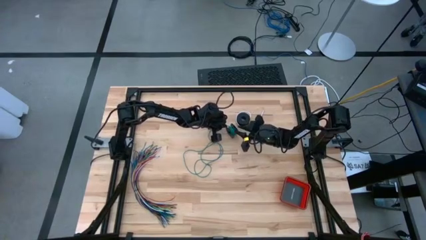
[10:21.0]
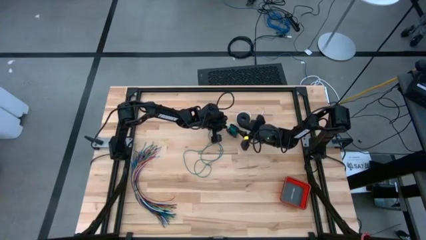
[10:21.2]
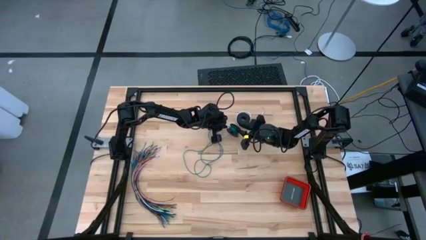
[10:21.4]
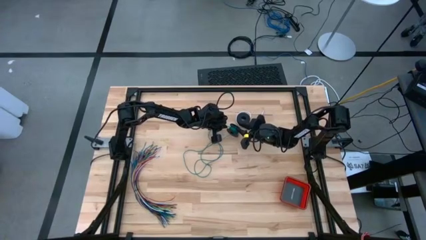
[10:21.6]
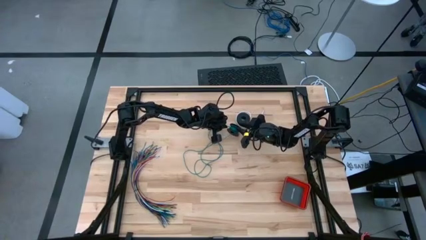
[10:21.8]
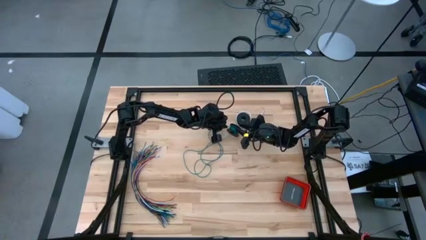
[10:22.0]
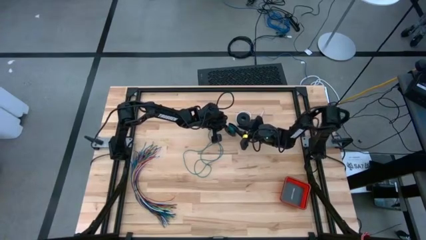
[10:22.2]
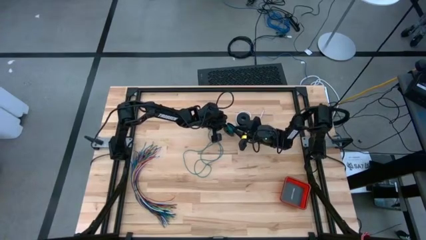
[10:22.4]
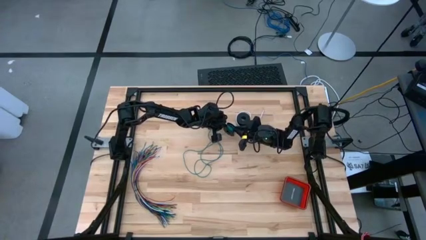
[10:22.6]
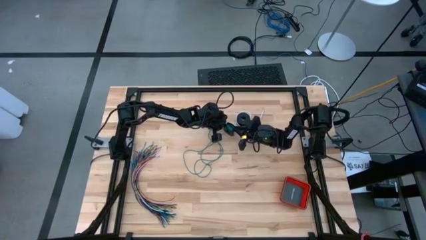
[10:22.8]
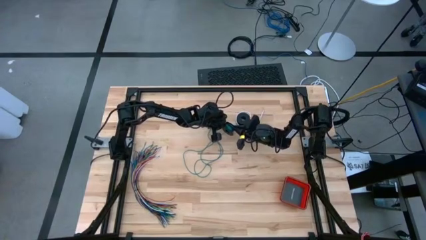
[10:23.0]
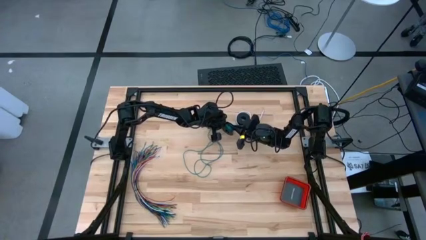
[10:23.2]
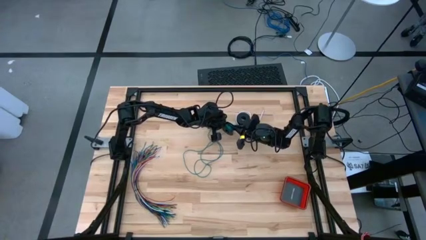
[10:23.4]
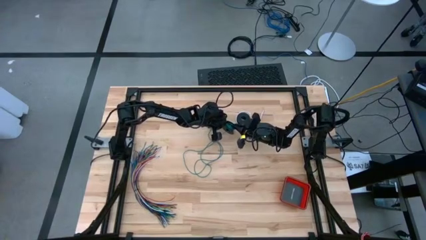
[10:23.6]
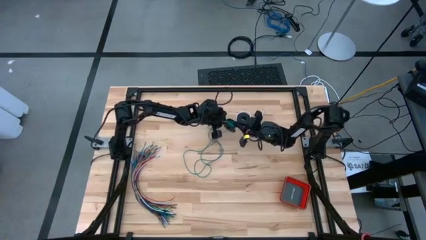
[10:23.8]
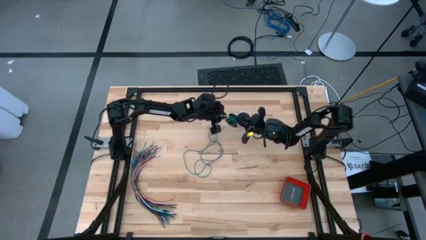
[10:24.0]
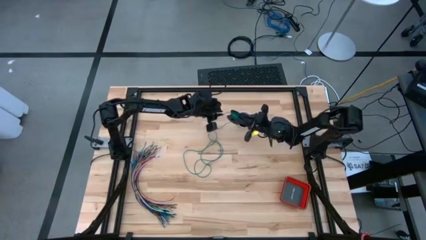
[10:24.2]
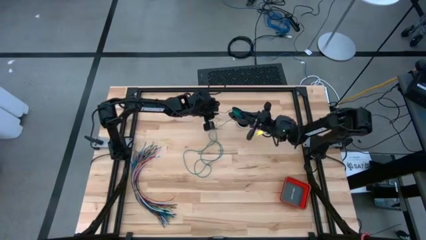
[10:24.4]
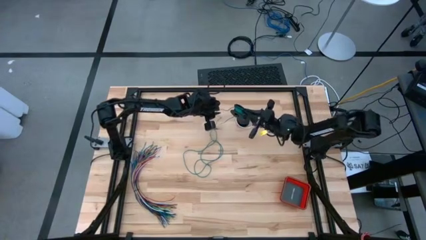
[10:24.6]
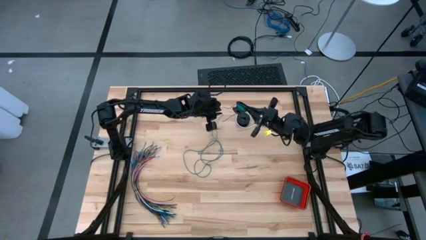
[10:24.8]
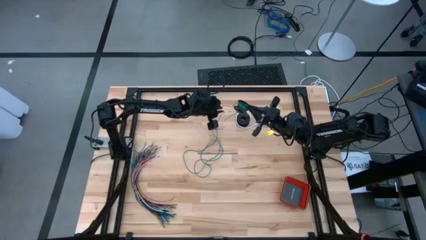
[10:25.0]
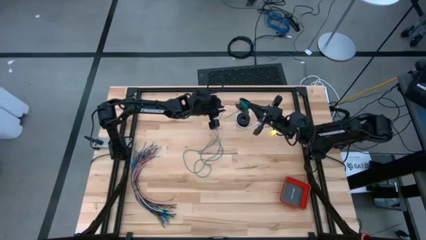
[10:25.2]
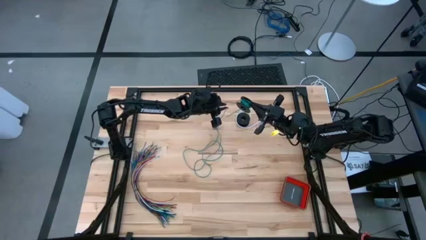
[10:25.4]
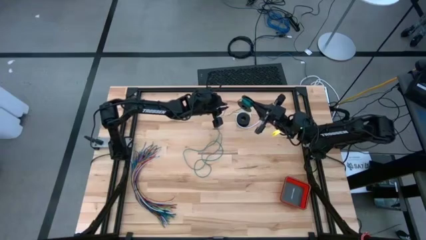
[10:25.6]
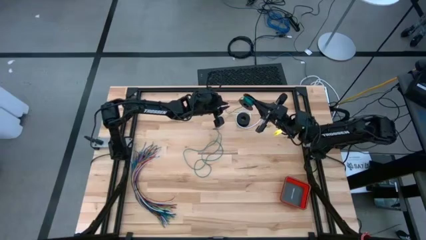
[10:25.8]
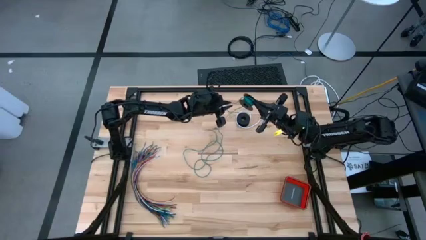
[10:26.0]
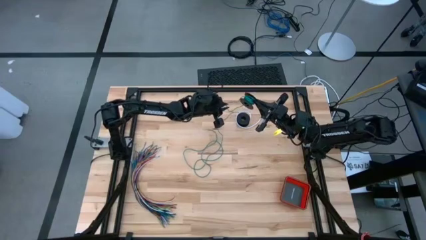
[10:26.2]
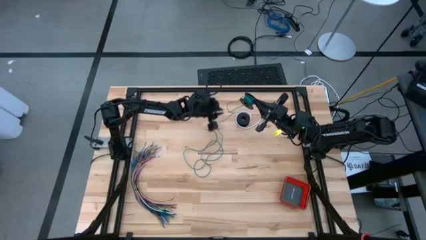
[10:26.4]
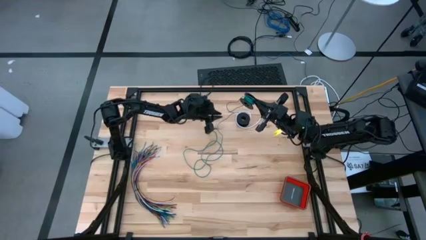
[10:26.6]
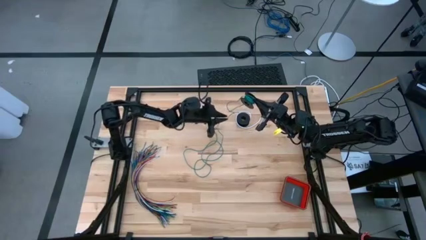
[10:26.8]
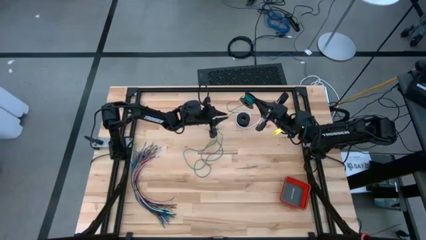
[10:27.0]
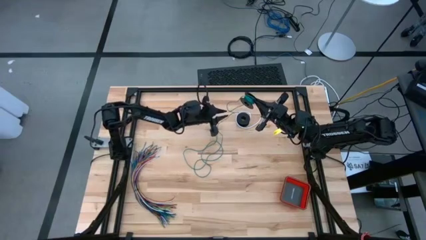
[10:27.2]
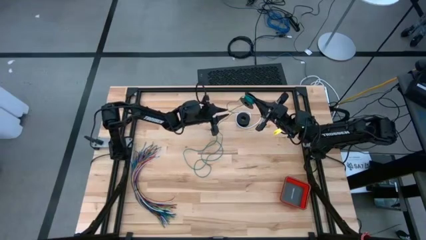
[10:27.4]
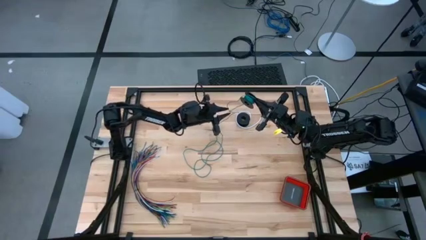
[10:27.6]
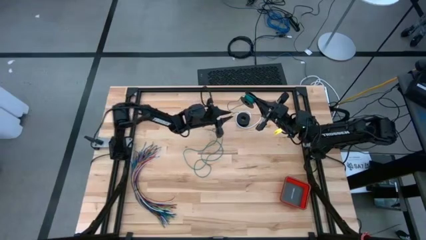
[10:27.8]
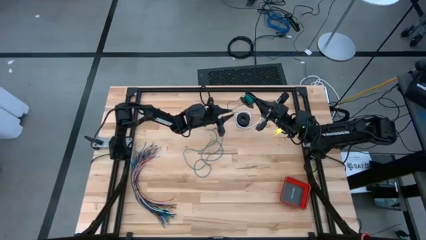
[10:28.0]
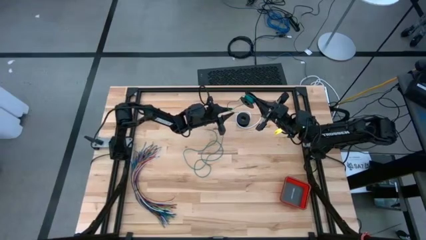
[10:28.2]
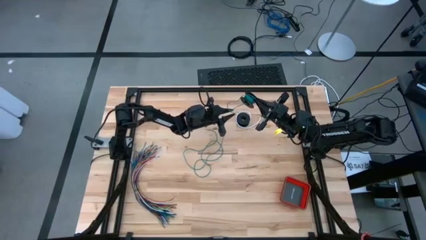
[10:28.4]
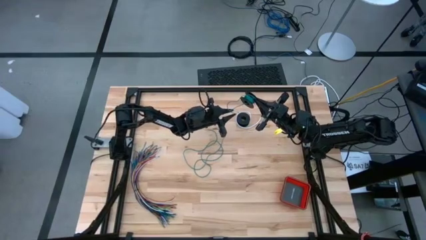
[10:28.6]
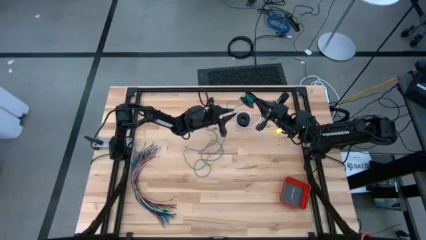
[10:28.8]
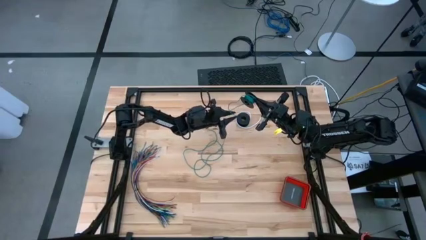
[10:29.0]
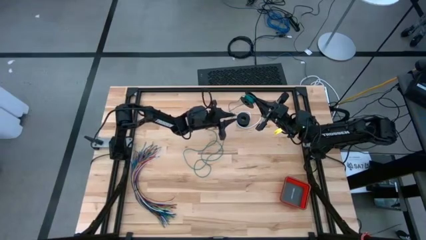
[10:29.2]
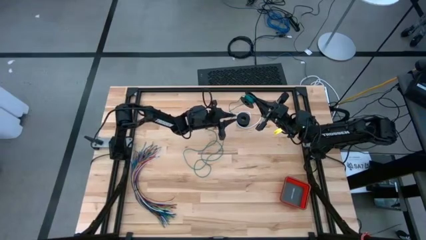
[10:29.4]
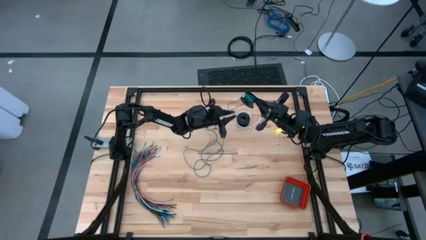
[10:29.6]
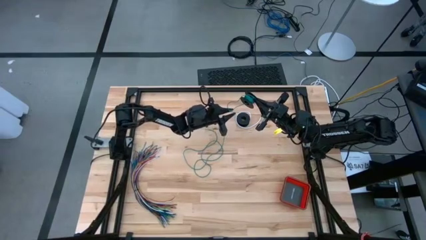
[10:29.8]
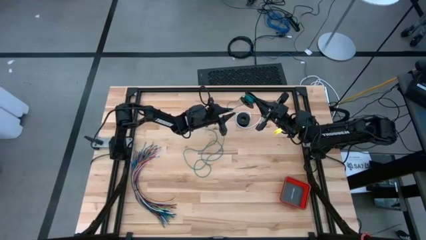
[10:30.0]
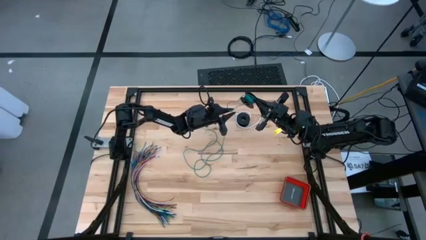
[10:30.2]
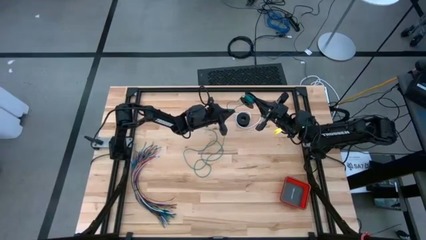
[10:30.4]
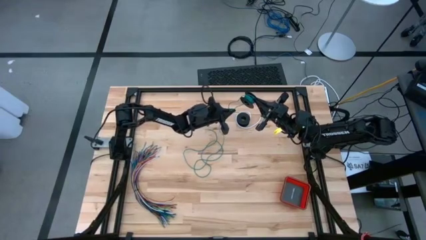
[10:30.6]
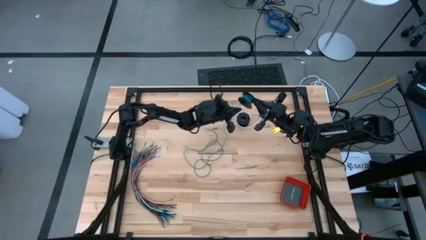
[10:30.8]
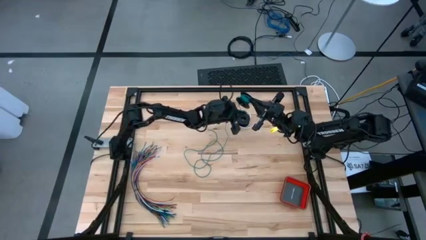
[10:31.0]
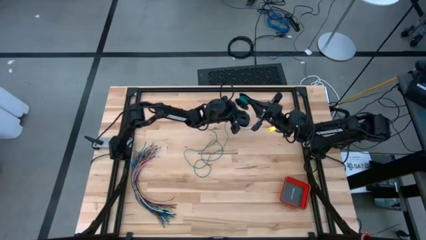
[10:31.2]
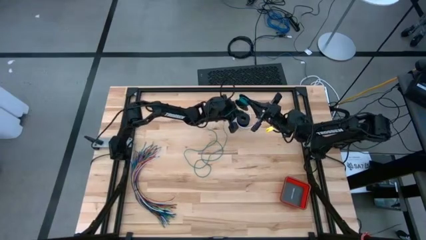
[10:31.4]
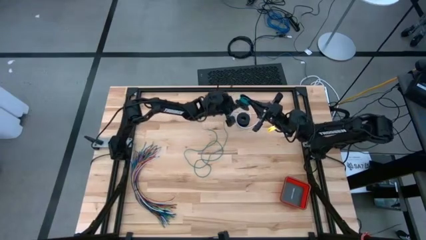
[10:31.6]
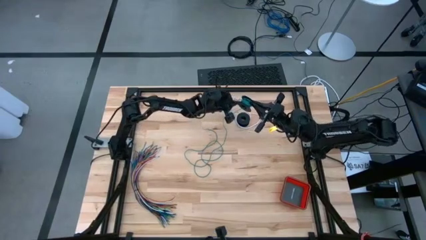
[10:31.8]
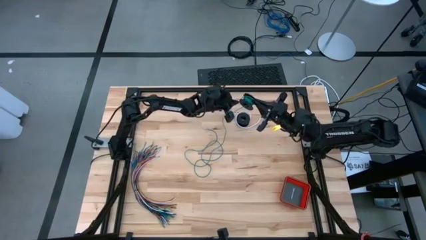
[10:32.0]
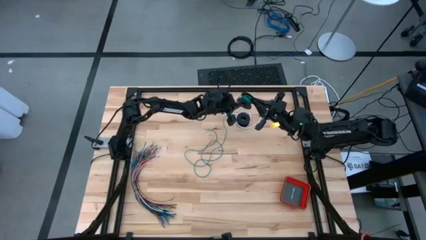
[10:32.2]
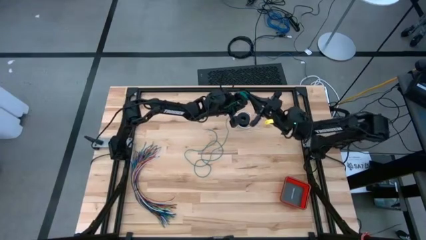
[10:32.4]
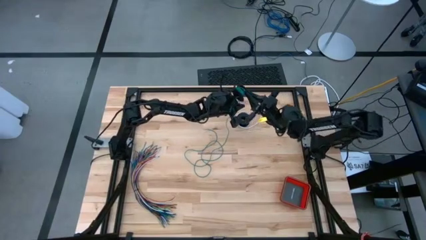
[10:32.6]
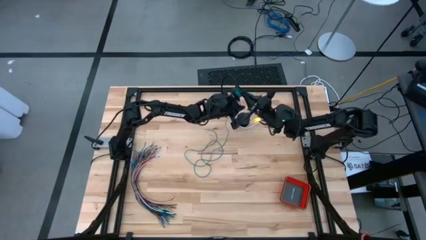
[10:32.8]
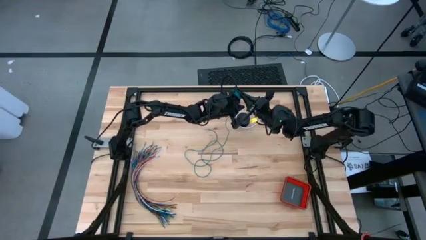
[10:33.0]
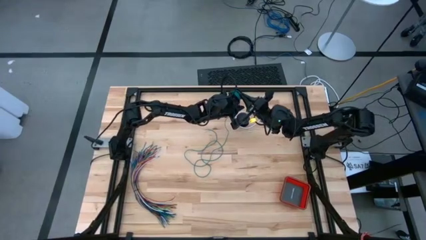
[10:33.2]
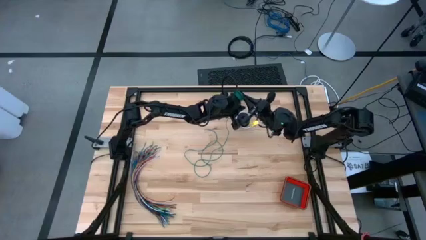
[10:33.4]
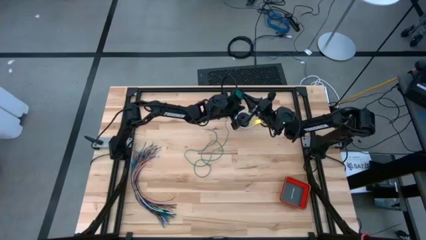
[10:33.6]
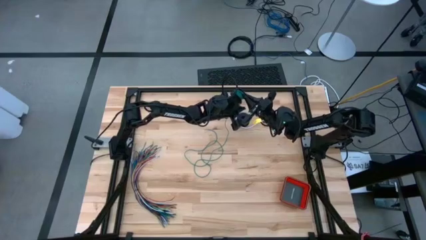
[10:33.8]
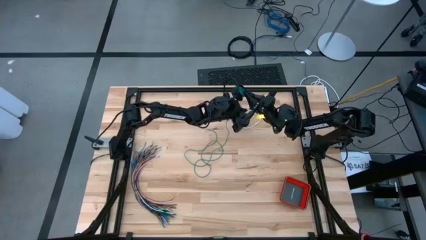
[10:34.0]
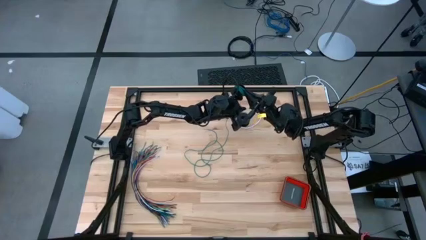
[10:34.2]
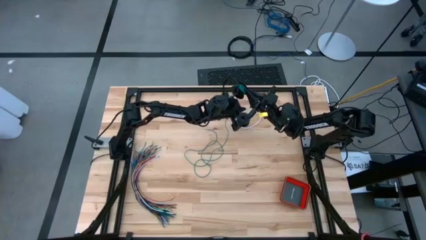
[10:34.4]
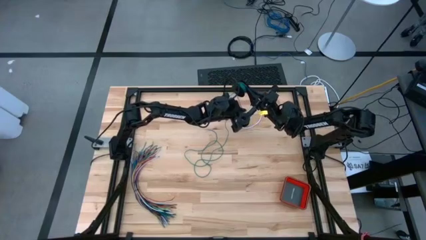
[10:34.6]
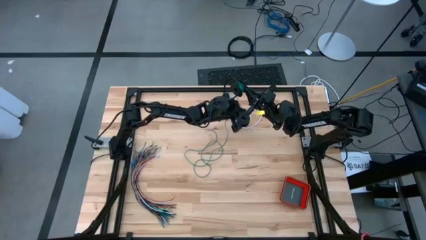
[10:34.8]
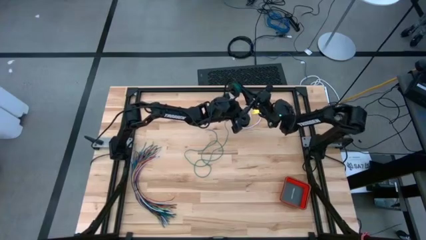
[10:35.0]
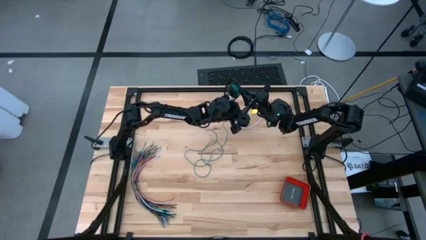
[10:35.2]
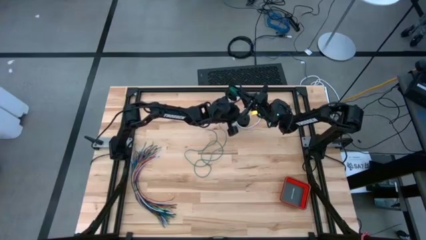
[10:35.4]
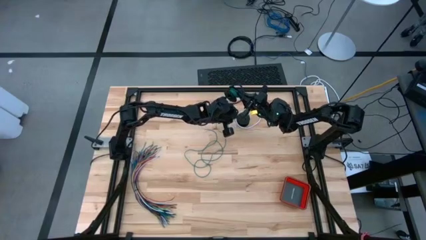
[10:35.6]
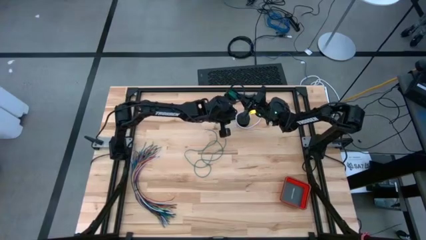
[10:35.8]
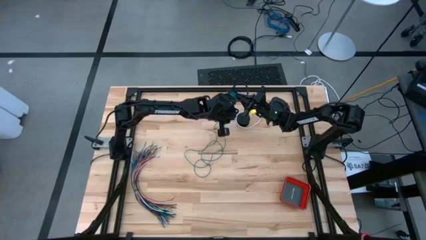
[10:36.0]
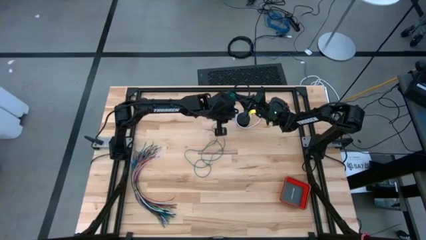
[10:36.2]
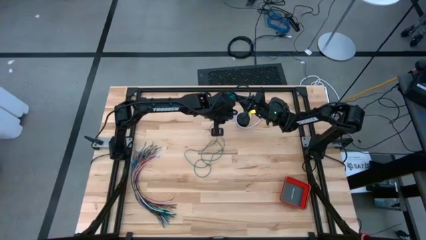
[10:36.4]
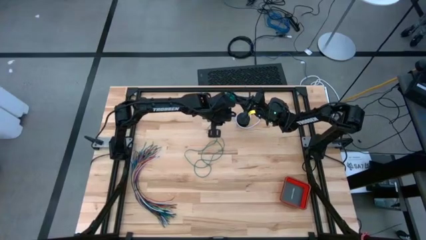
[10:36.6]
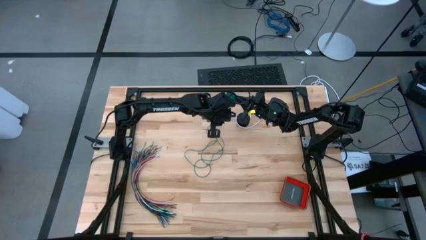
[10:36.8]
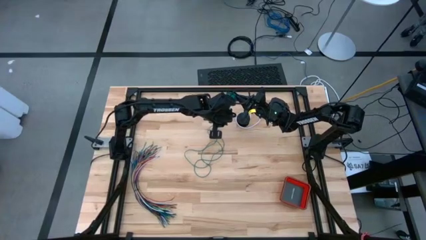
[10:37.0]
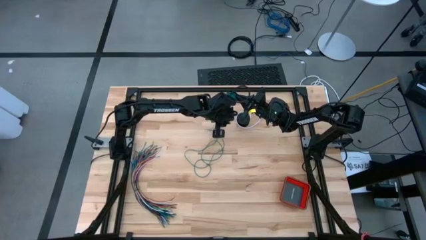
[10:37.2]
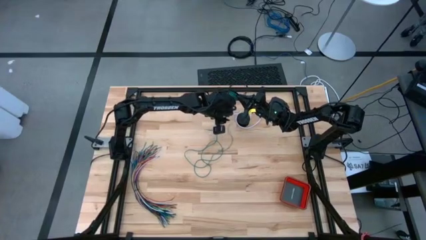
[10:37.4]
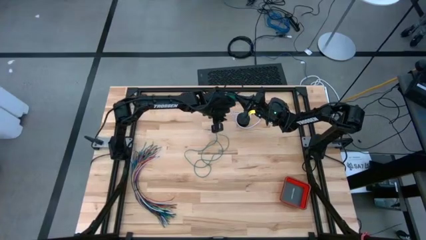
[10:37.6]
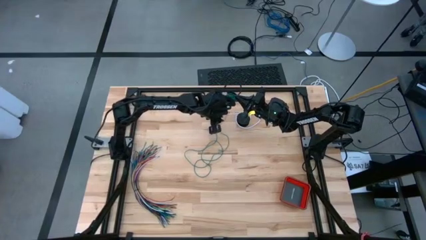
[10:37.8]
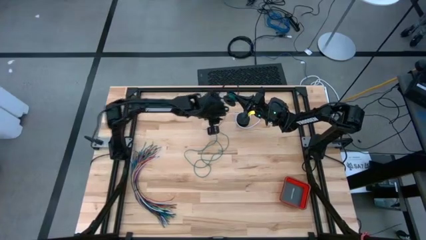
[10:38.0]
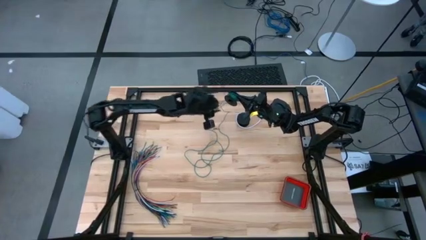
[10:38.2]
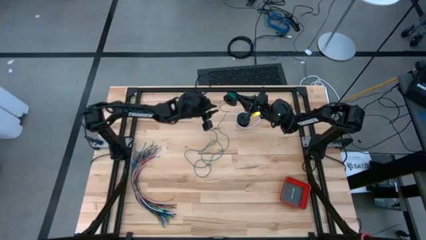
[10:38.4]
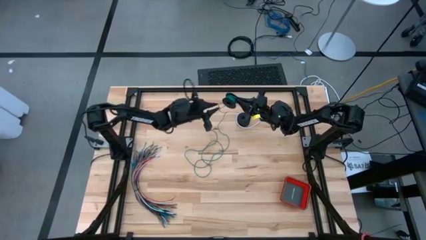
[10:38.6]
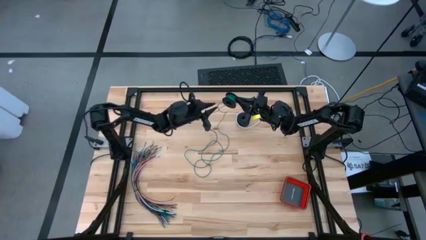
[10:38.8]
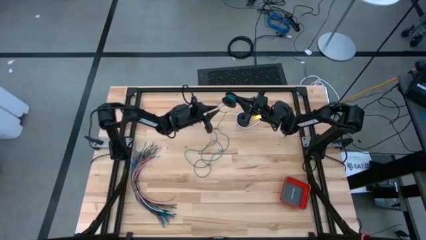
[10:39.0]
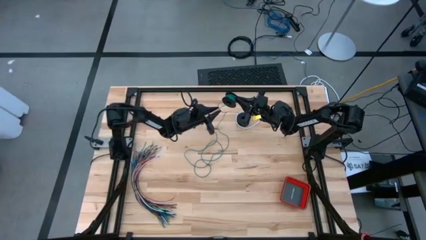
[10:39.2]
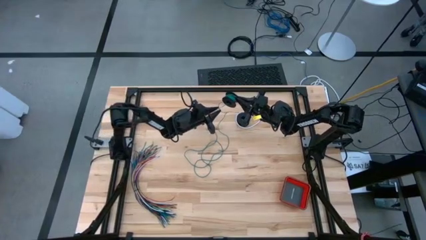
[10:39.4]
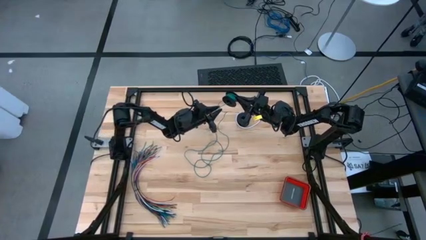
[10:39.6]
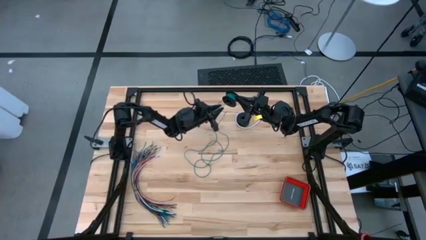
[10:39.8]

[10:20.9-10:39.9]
Task: Coil cords
Coil the green wire onto the spool
